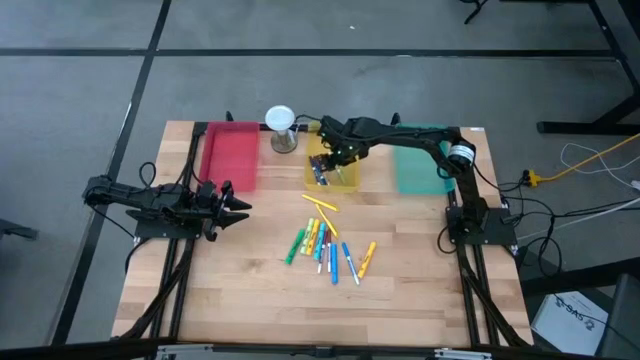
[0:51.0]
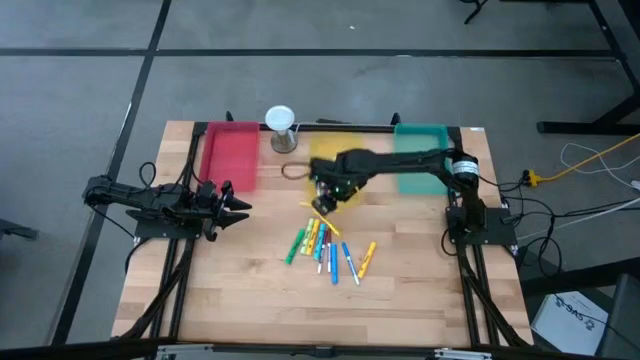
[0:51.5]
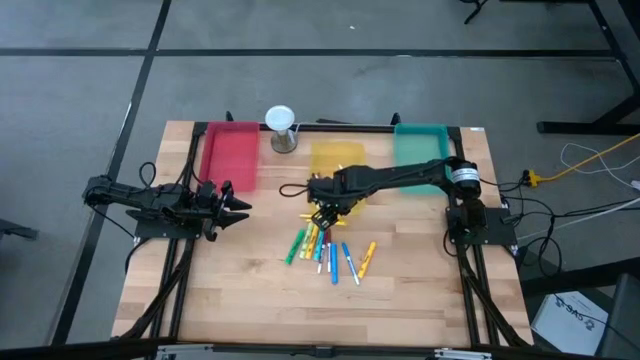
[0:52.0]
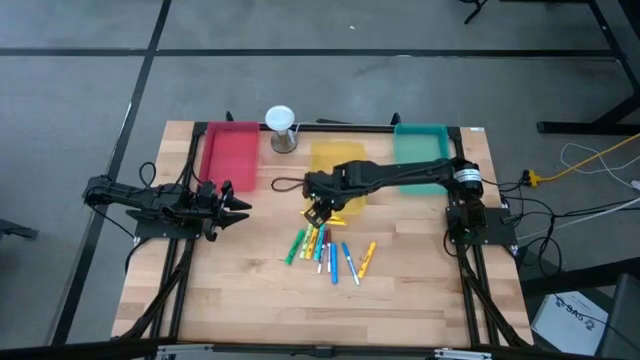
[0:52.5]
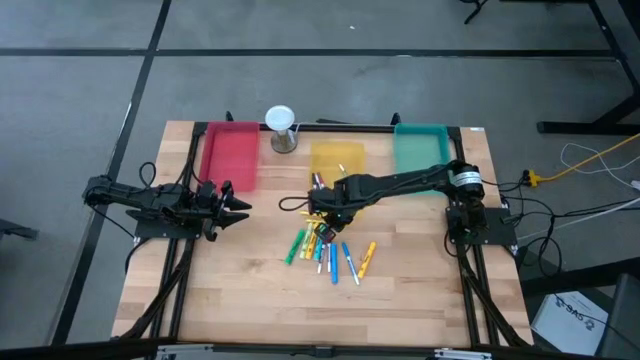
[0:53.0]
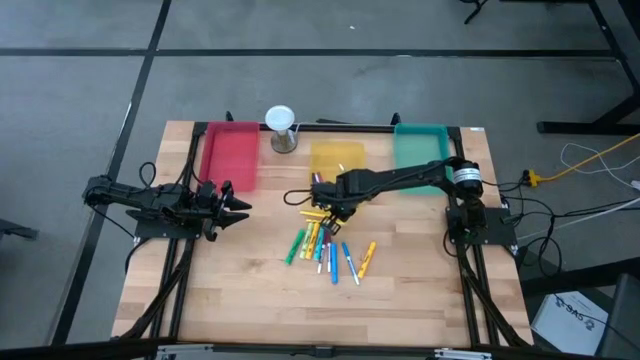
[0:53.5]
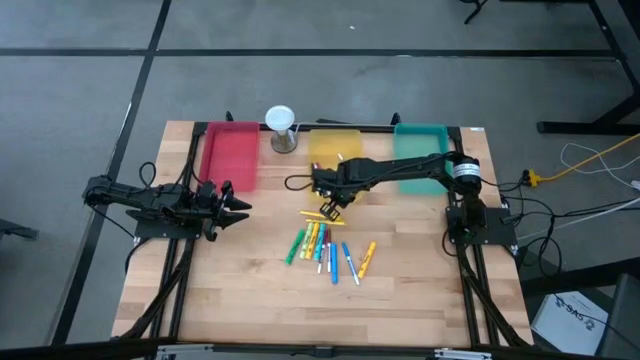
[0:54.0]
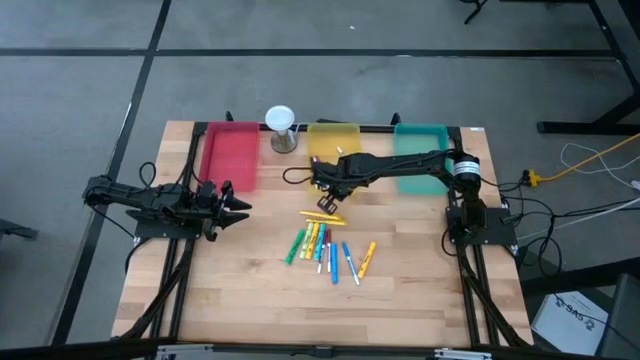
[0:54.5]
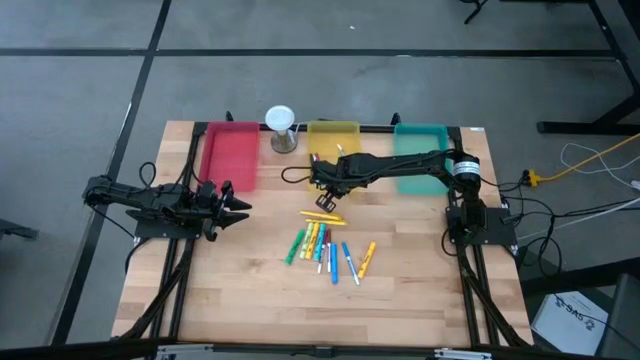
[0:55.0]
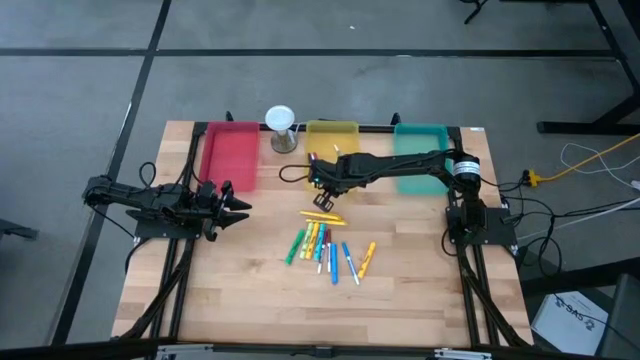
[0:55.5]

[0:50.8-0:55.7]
Task: Pick & Place Markers
Adjust the yellow bin

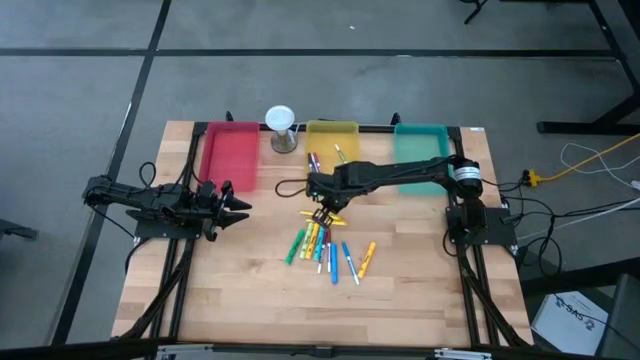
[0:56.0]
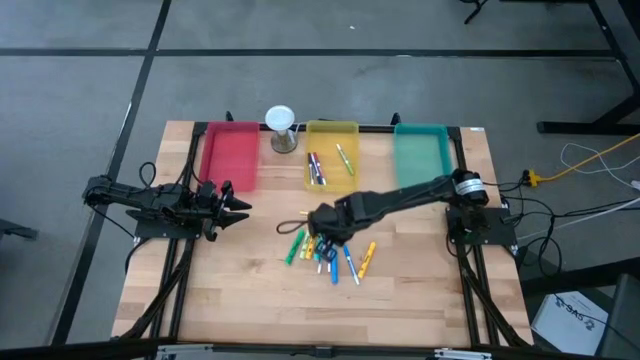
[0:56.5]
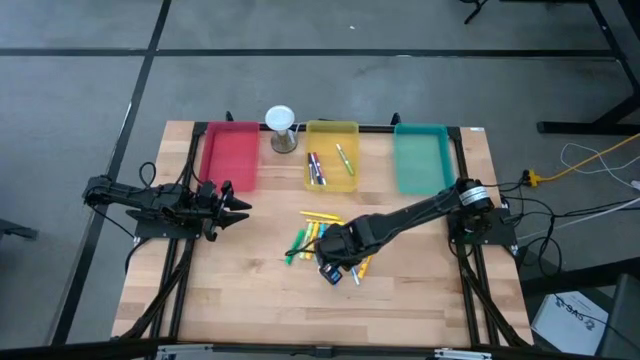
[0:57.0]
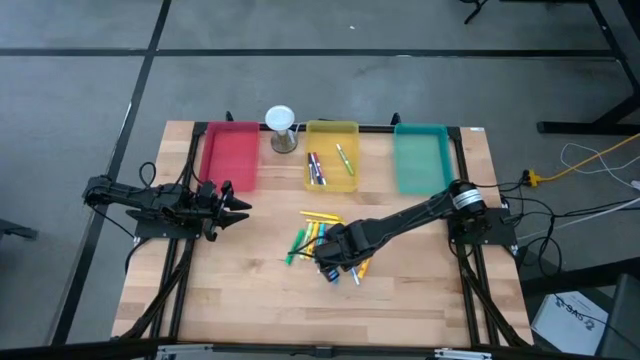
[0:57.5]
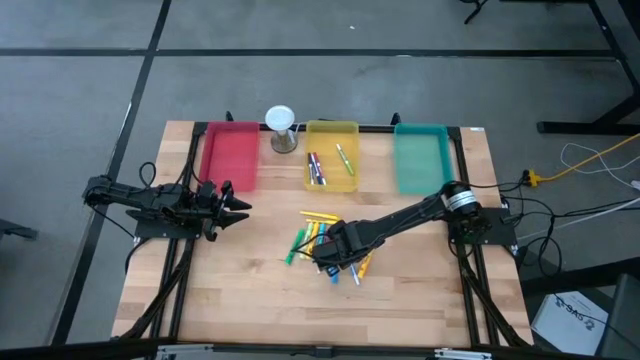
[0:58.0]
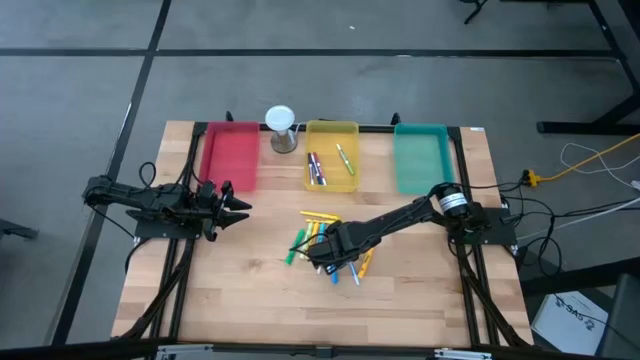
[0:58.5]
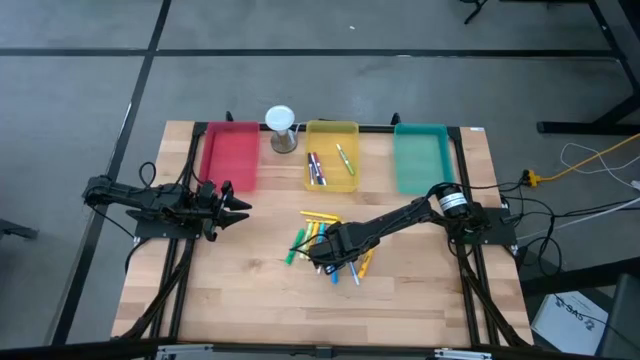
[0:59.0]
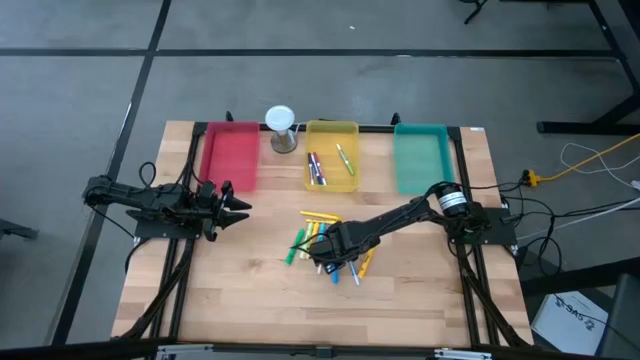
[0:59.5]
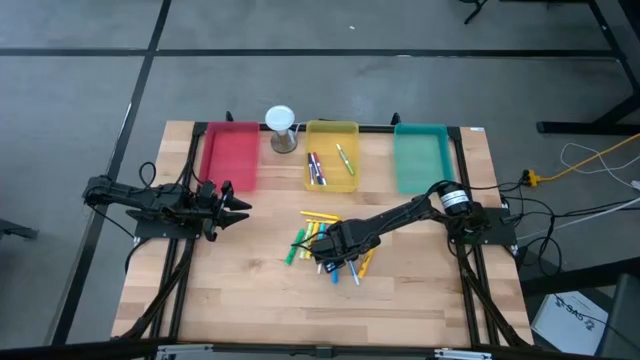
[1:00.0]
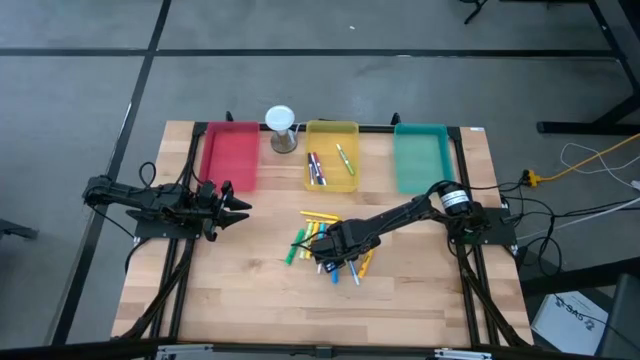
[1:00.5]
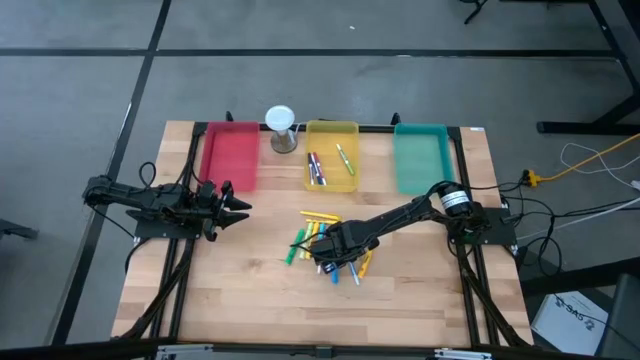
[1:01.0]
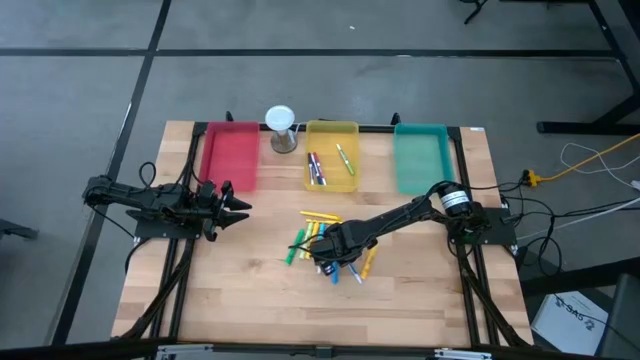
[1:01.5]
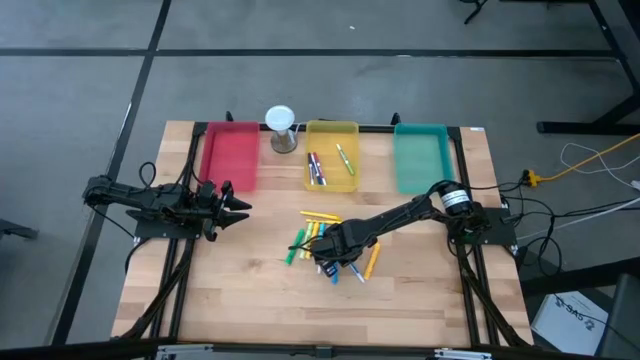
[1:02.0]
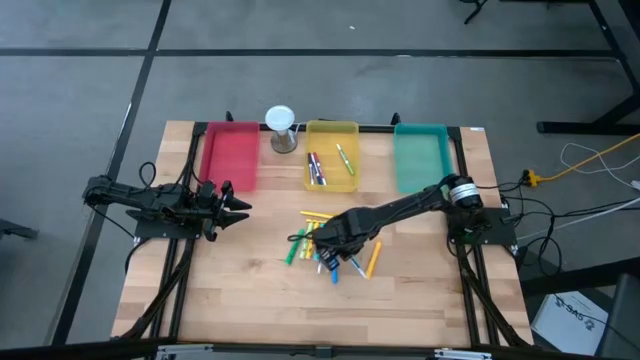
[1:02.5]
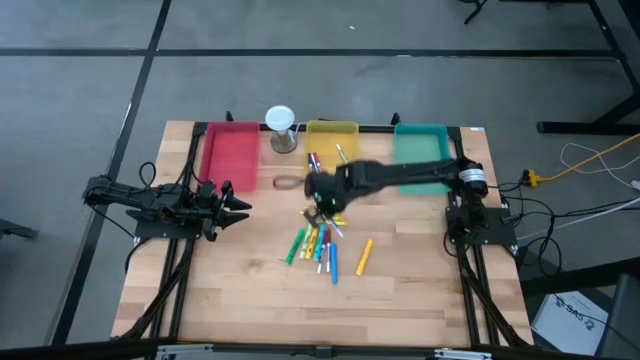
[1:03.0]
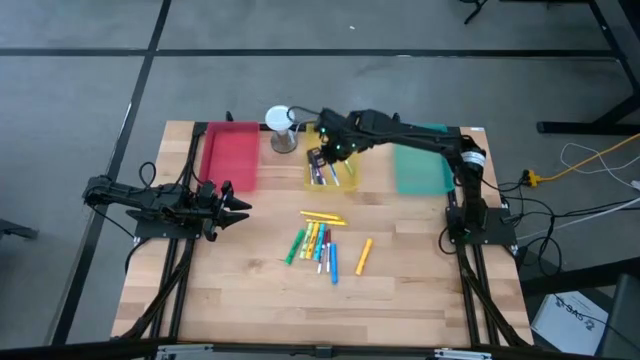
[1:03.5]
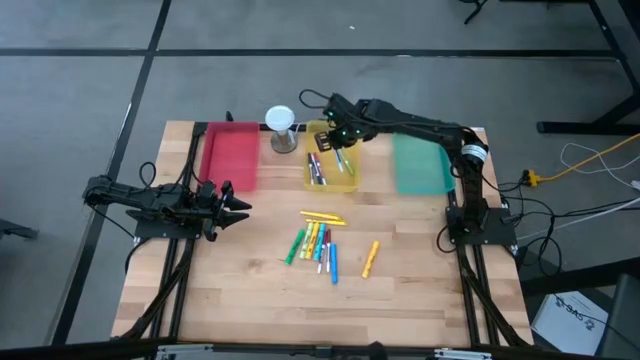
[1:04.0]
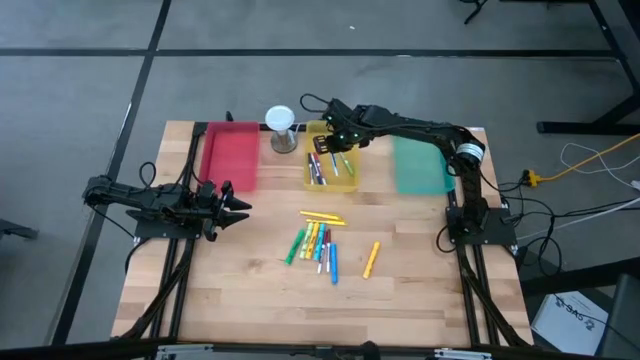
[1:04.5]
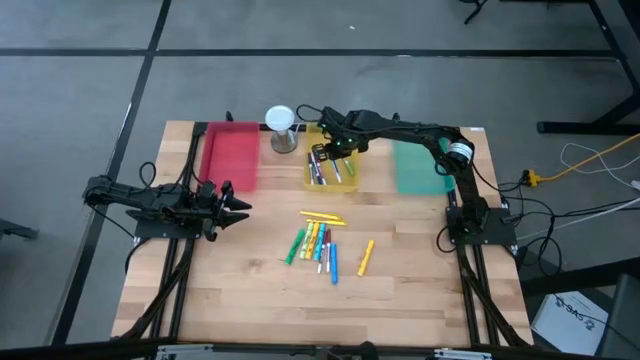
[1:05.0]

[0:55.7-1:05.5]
Put the light blue marker into the yellow bin

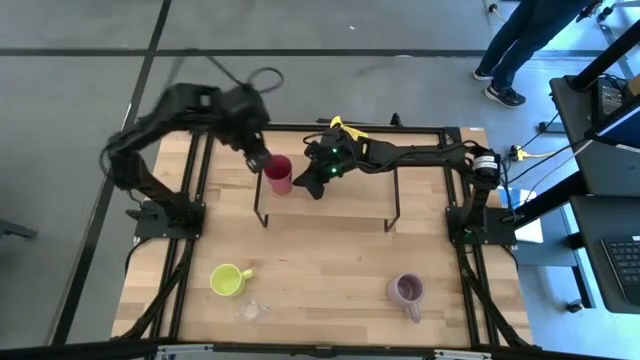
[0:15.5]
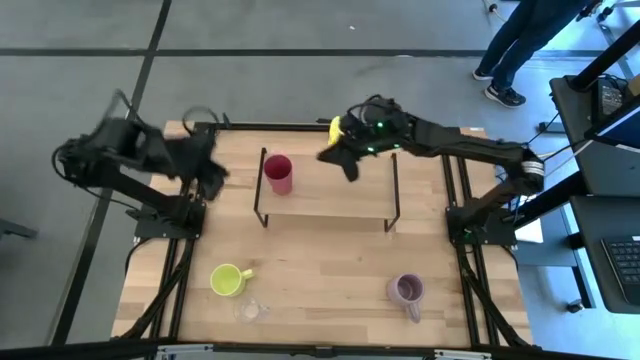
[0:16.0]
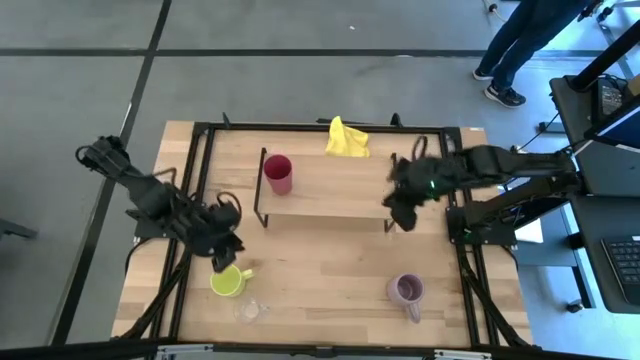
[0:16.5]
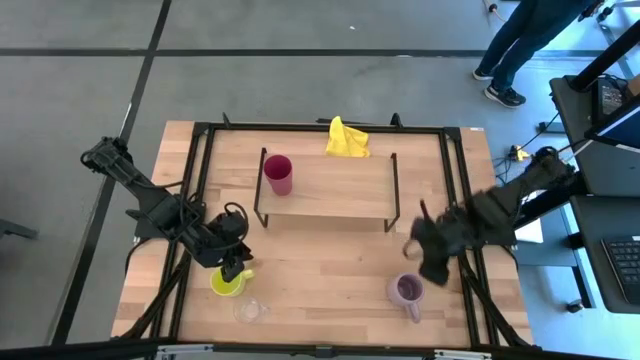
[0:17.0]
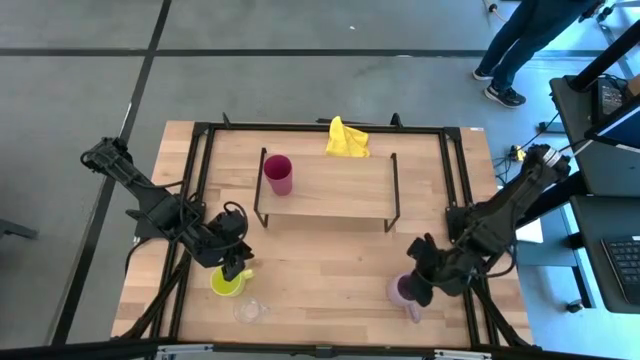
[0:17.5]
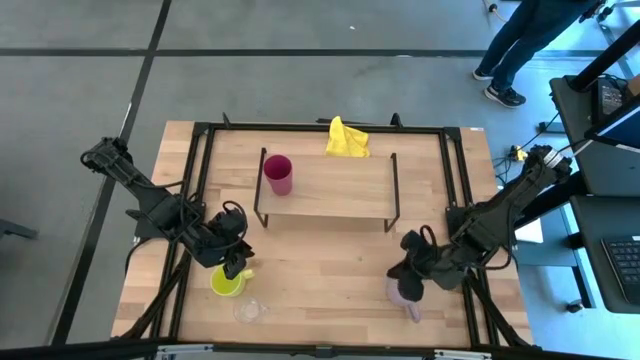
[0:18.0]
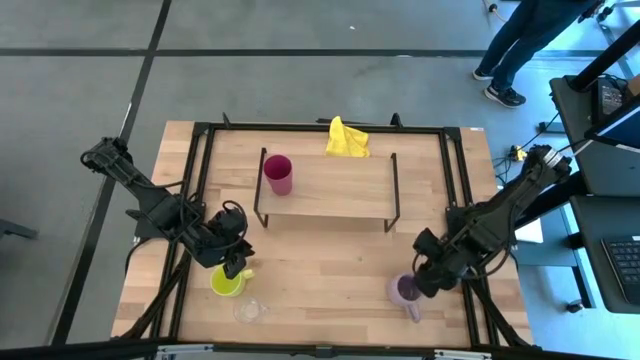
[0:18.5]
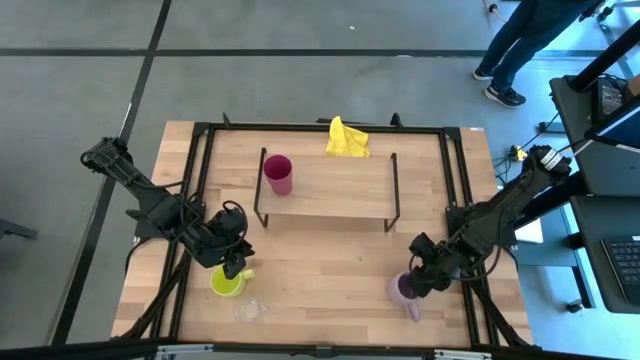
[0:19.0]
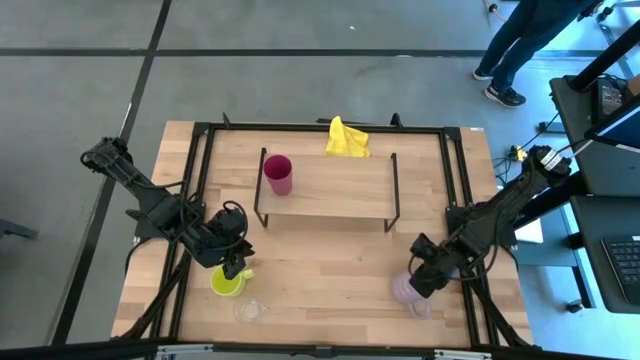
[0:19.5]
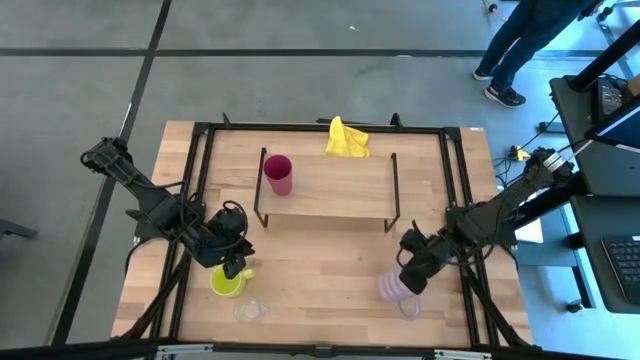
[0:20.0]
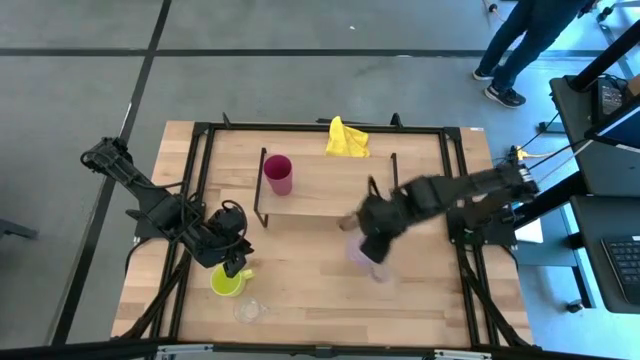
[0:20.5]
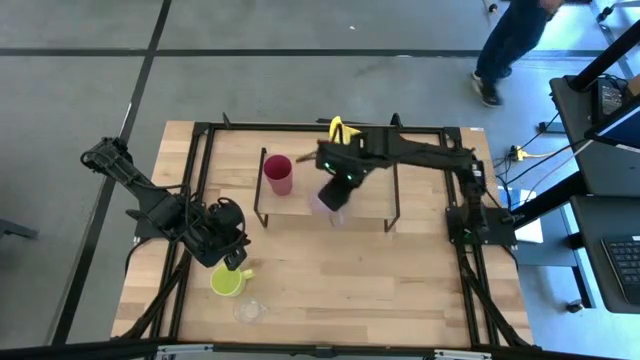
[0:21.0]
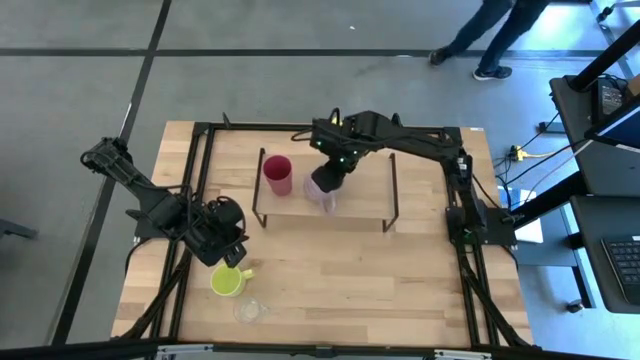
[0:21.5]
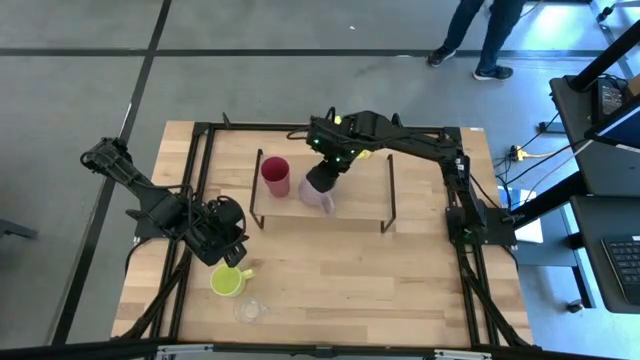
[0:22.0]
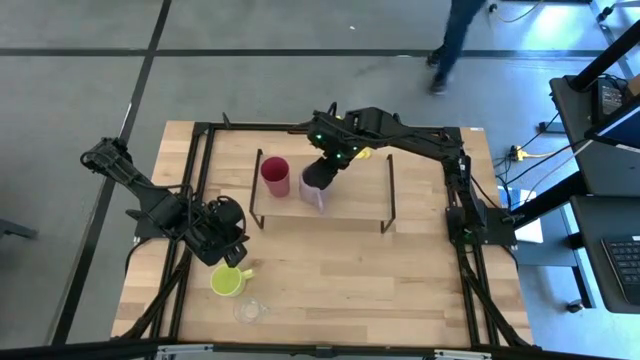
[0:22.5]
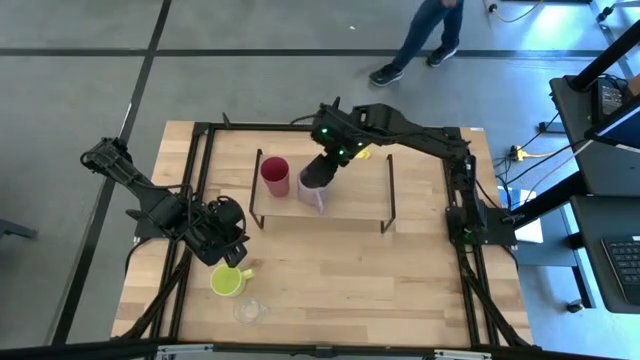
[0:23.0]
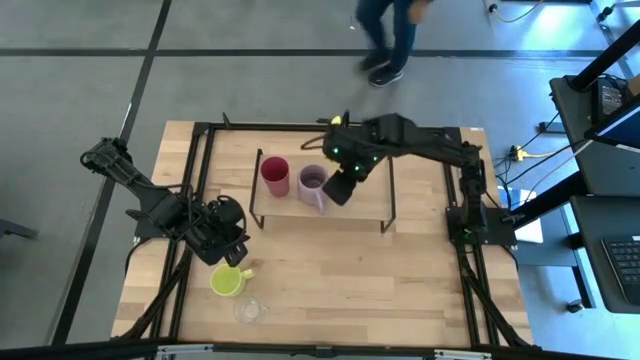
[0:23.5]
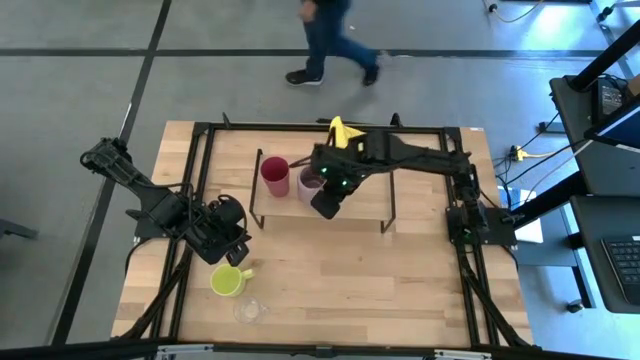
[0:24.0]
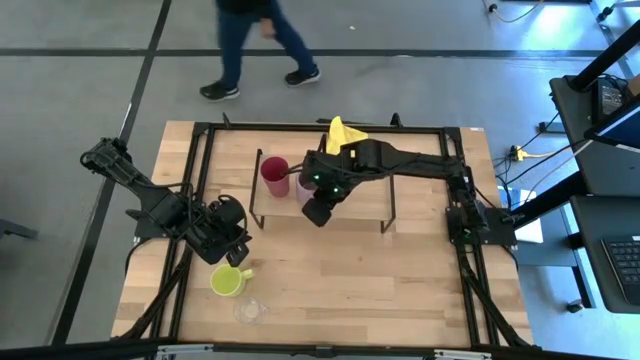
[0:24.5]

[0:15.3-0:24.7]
Task: Stack small to large cups/mugs on shelf
Put the purple mug on the shelf
